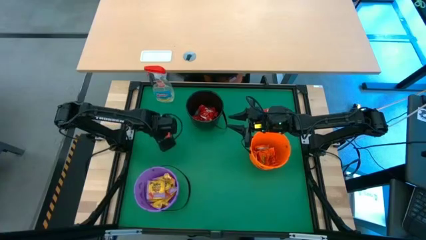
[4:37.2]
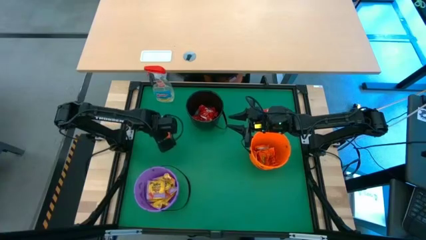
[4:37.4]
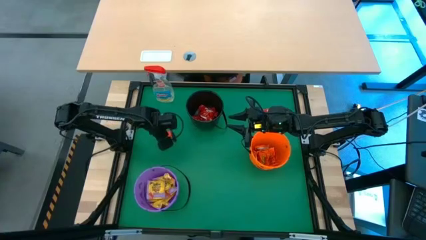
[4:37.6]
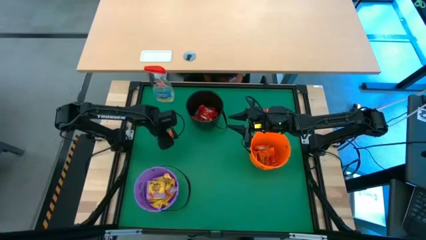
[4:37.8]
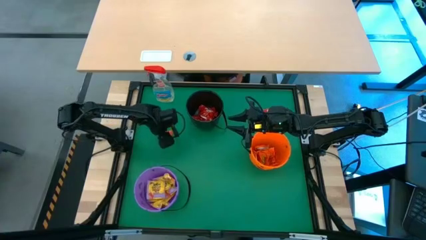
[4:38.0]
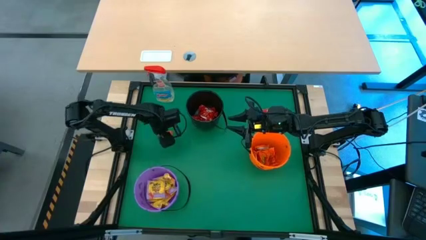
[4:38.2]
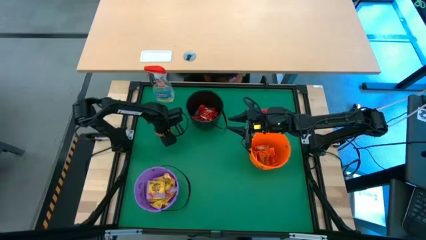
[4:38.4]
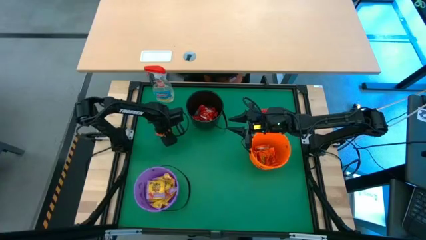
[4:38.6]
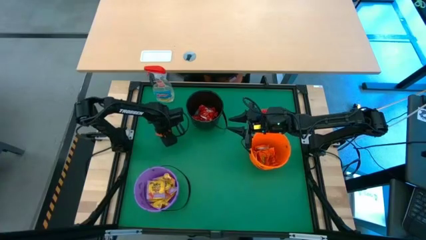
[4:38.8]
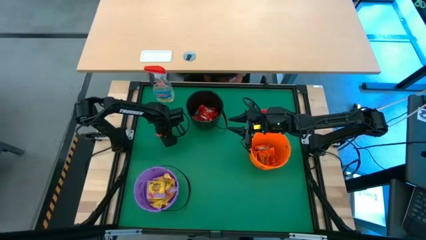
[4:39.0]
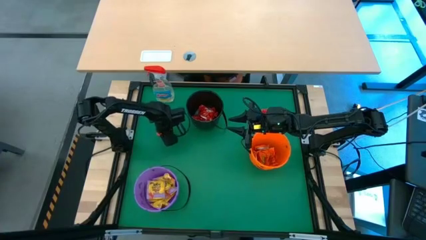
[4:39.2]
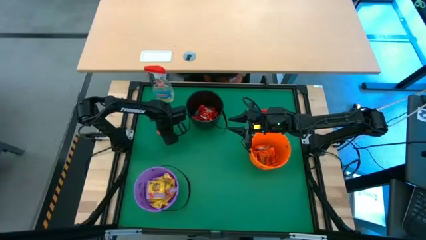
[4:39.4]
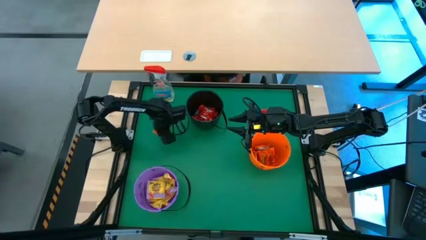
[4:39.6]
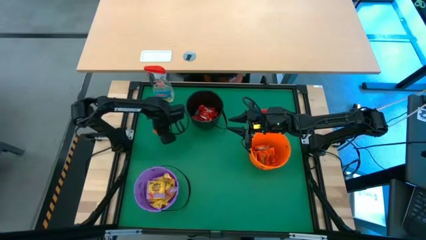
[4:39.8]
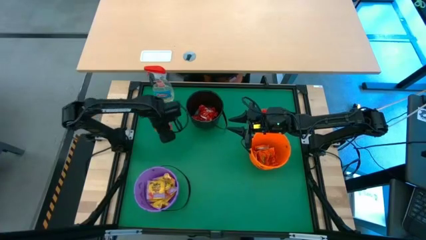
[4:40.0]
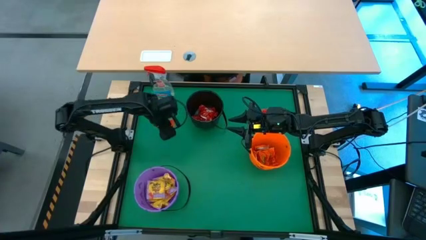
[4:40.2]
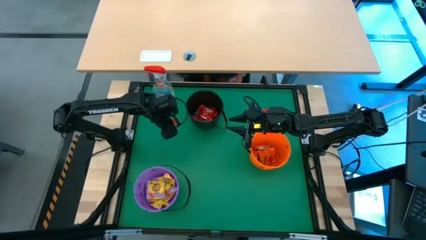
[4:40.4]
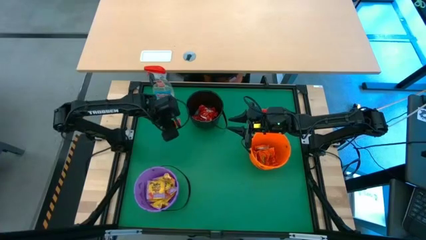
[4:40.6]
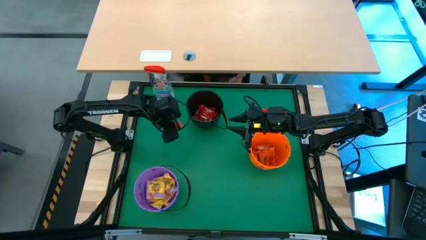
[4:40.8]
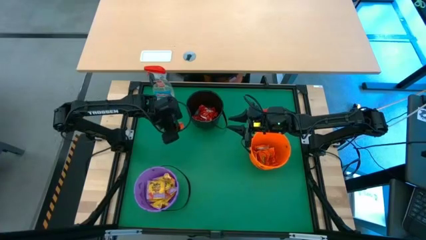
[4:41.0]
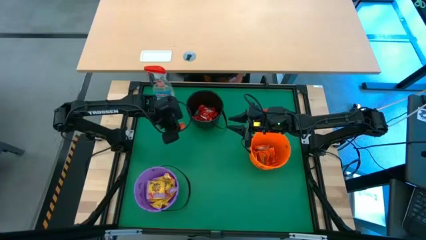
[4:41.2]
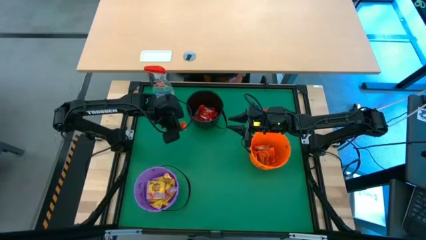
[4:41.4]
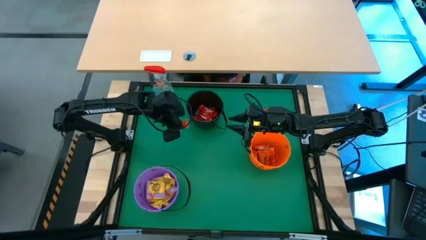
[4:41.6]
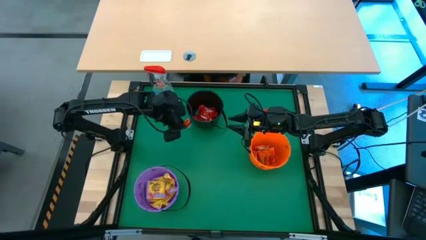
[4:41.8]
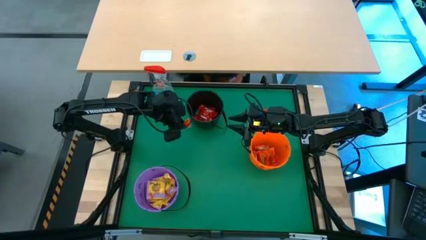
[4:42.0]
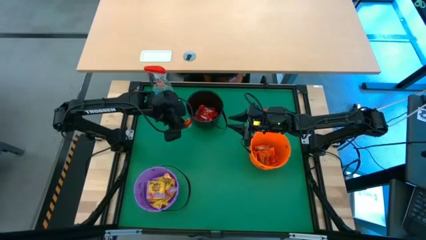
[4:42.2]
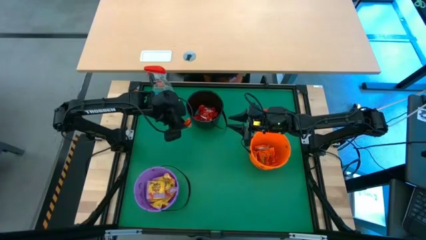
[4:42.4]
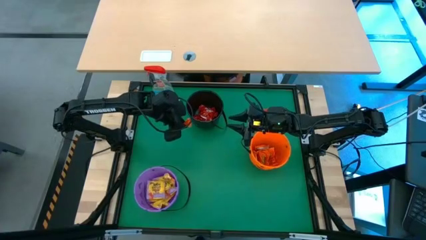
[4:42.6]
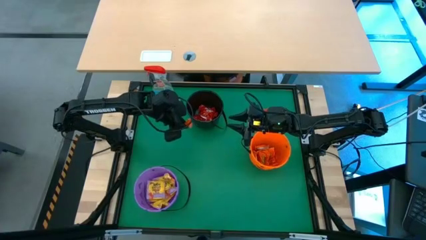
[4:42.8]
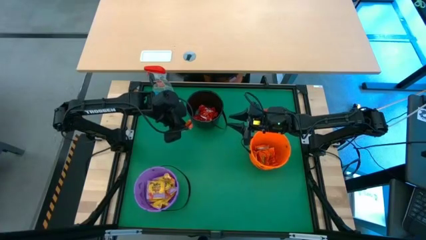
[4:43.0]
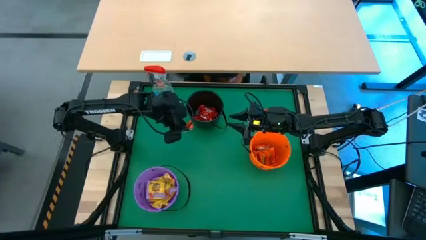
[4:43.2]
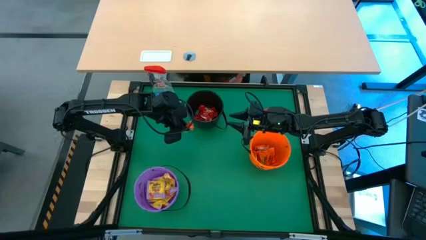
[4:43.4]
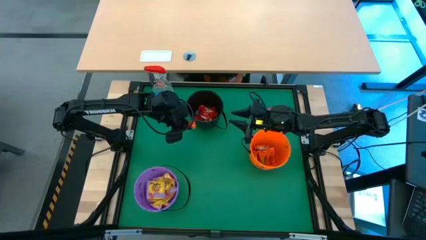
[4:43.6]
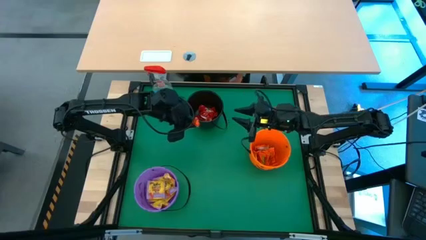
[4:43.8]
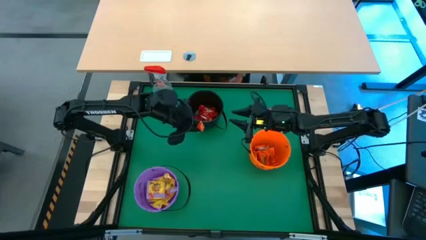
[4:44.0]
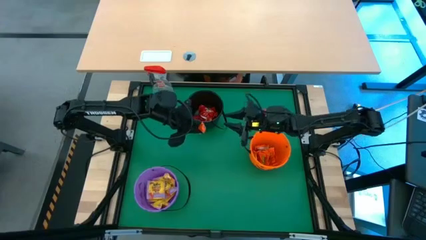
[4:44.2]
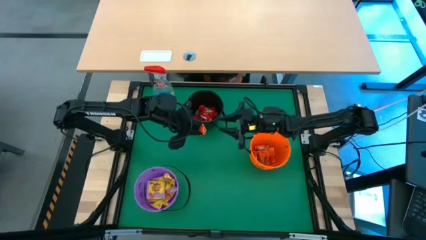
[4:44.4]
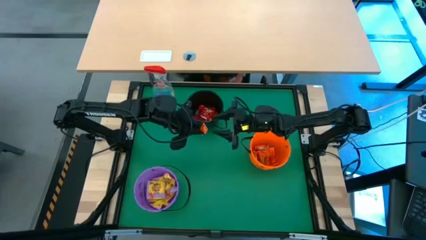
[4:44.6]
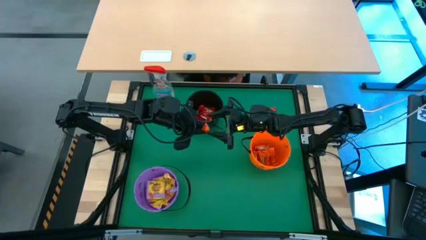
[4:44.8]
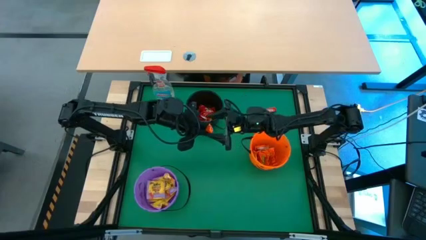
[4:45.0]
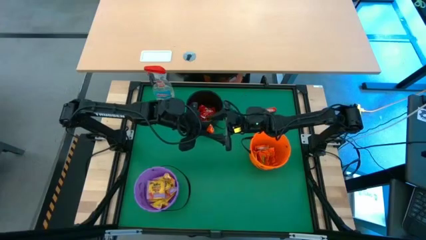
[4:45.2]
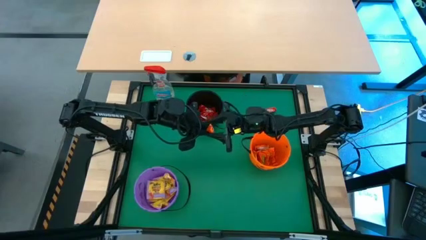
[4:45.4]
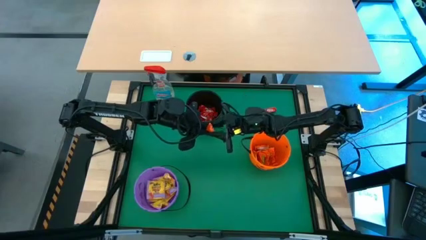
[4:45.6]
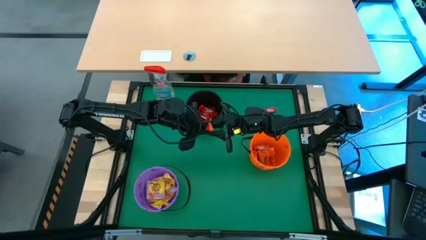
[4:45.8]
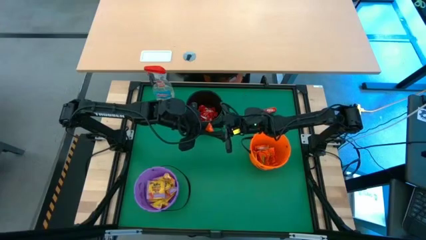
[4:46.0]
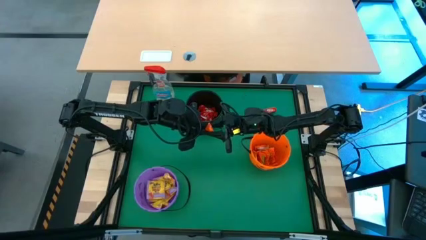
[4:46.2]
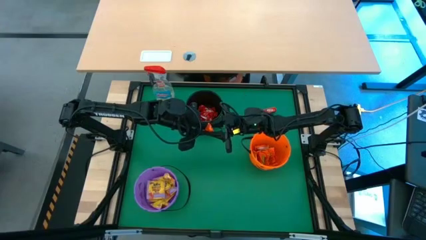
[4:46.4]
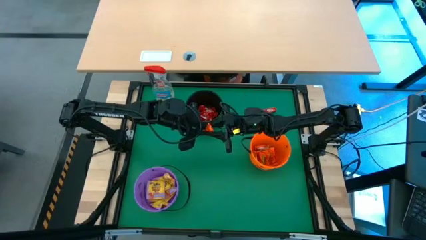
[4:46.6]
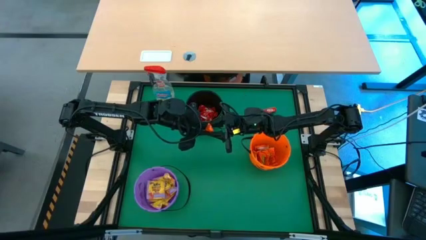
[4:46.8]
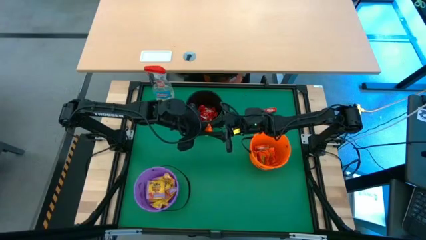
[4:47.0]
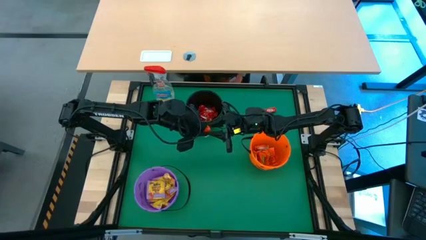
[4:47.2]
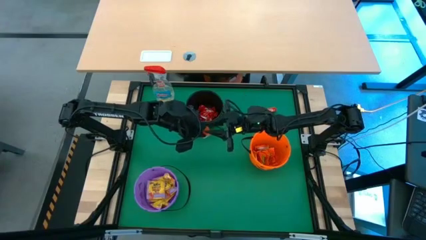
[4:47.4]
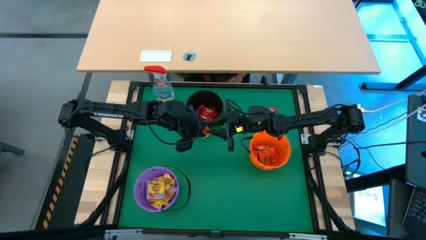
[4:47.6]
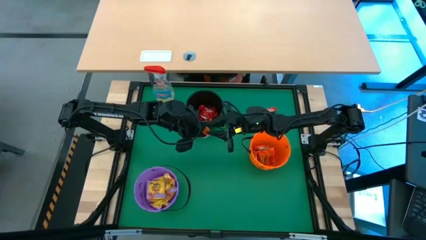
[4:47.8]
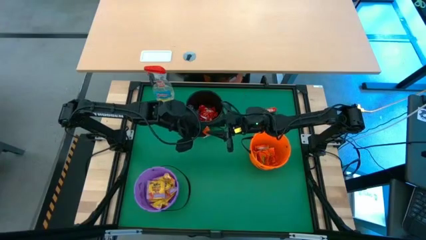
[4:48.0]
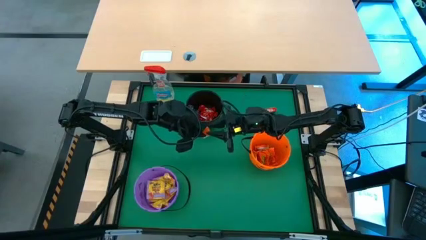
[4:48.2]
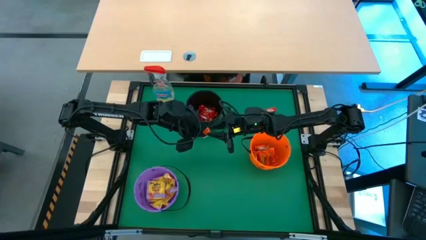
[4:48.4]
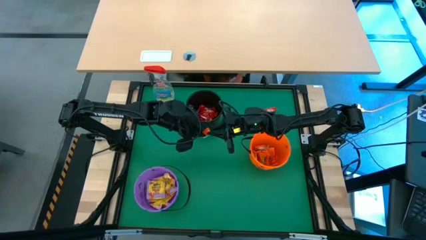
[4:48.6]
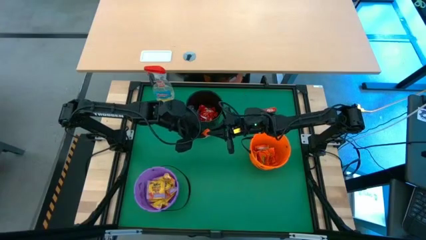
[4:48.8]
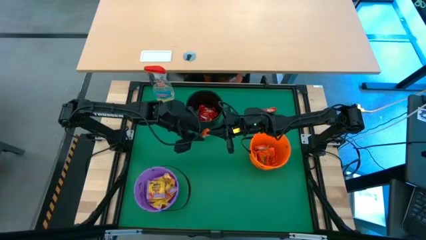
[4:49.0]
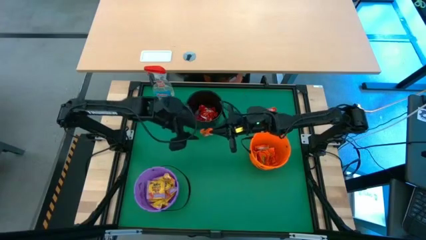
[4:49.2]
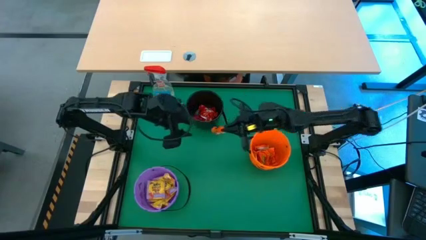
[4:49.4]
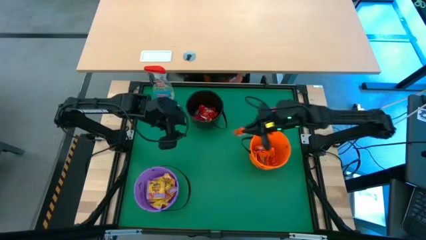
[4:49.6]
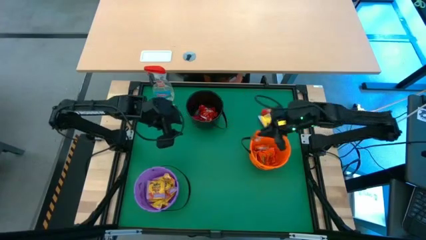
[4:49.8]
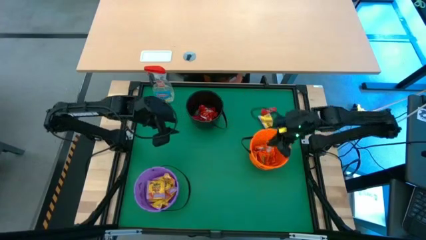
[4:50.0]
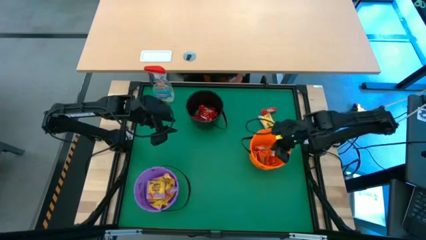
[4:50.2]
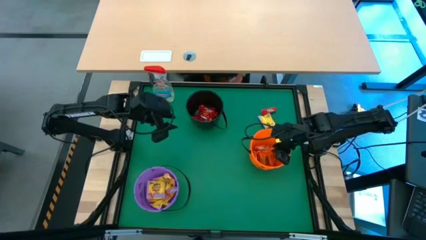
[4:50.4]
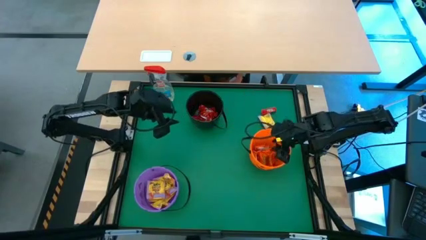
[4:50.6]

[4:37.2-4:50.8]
Task: Sort candy
Put the orange candy into the orange bucket

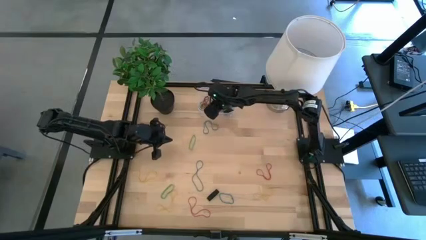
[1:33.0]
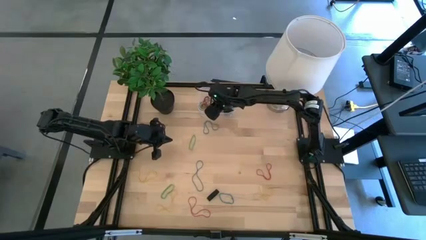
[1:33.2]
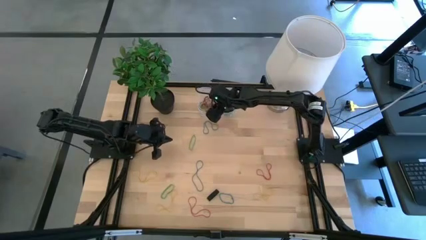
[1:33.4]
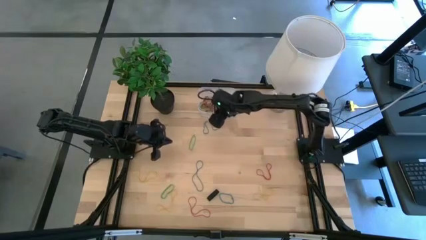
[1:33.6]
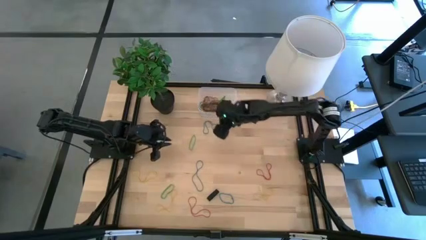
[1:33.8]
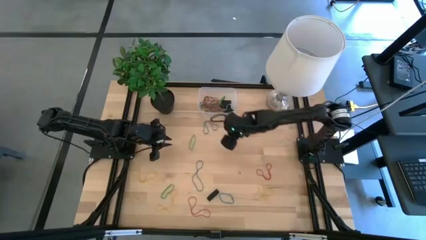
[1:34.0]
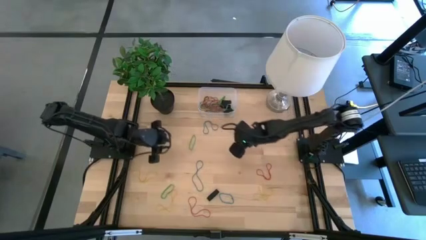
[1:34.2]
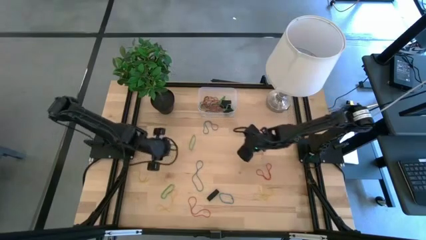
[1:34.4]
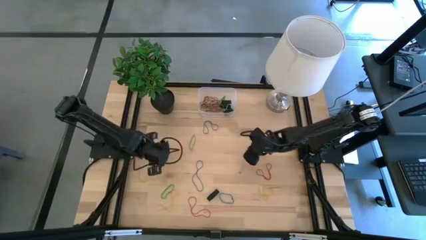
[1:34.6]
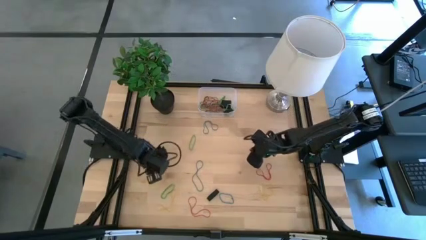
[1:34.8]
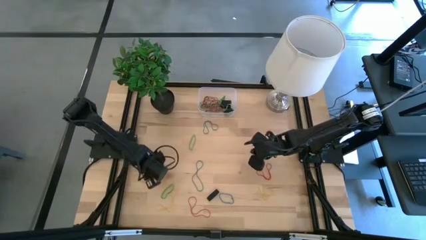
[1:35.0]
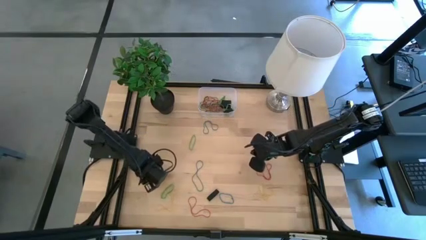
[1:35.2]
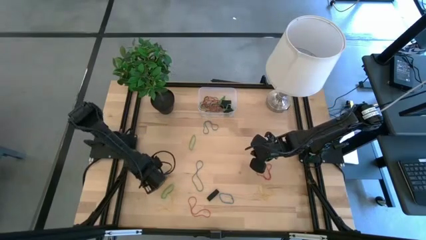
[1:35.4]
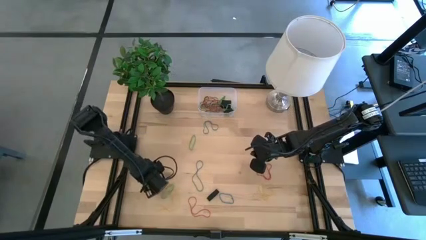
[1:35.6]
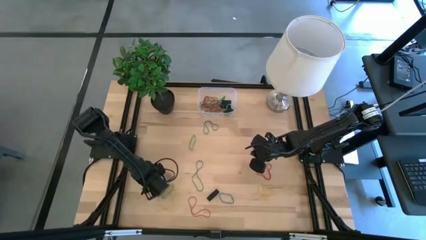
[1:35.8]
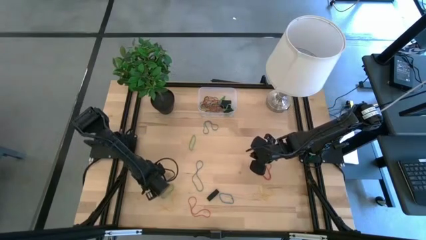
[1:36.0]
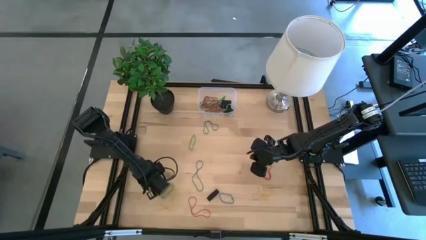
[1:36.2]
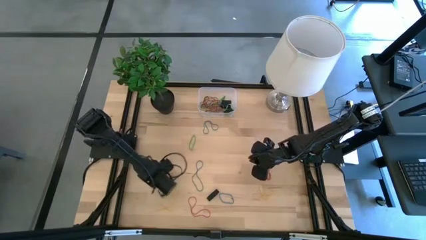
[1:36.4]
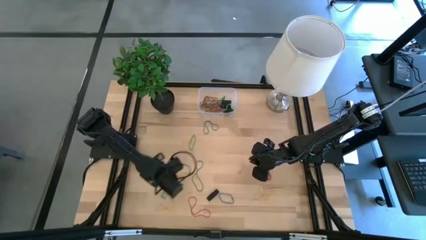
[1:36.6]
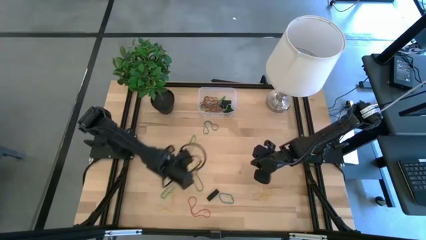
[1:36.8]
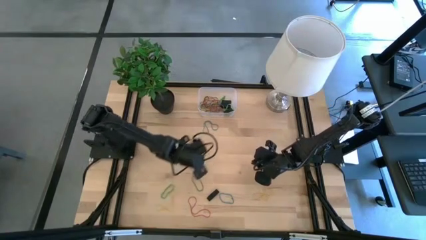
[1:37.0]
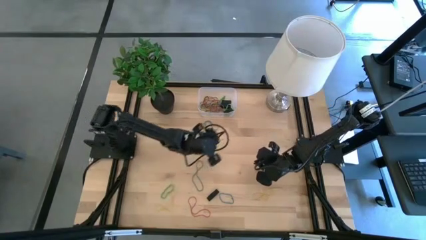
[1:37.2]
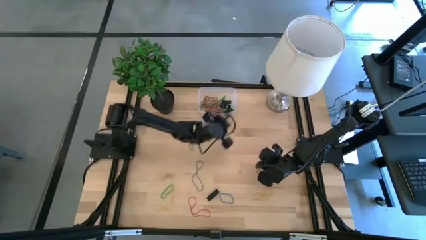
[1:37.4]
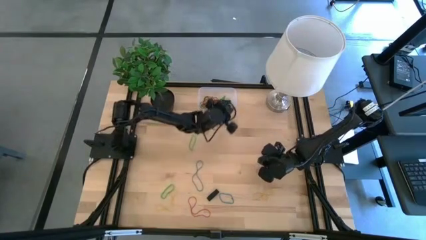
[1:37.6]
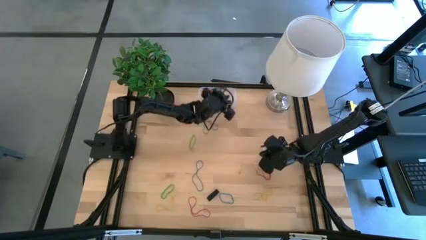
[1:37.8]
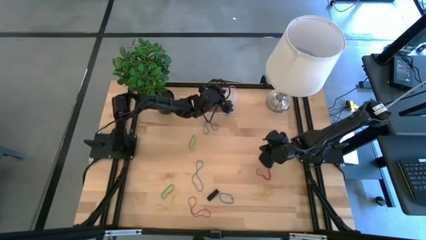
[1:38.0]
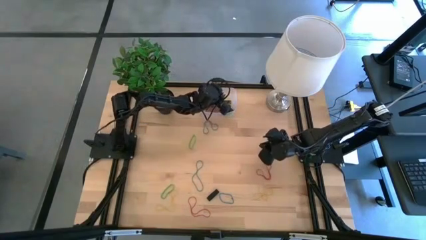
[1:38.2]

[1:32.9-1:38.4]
Task: Pick and place rubber bands into bin
Put the yellow rubber band into the transparent bin
